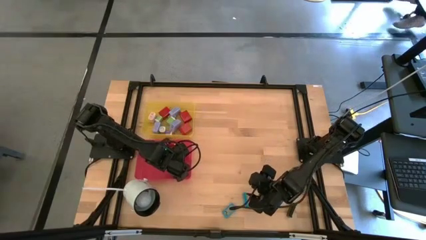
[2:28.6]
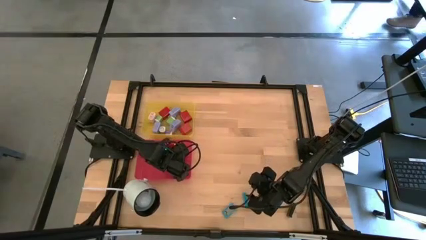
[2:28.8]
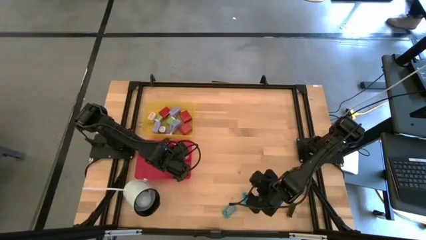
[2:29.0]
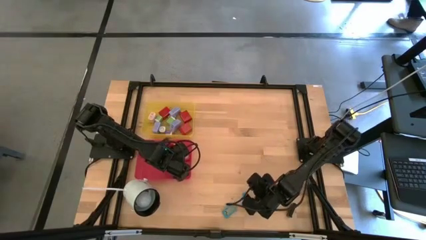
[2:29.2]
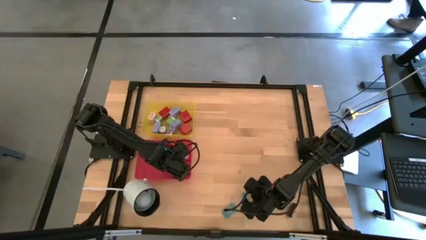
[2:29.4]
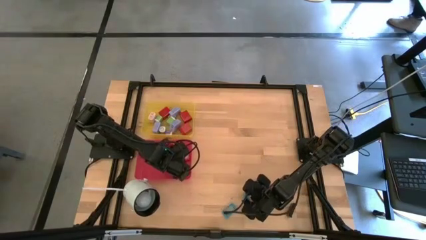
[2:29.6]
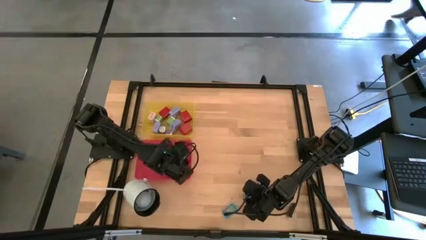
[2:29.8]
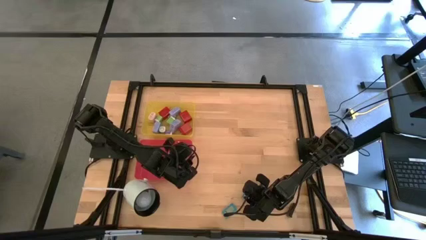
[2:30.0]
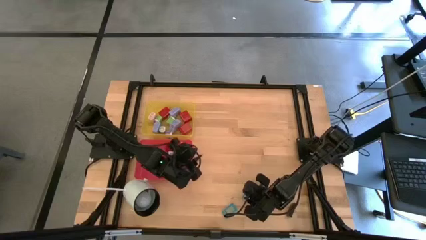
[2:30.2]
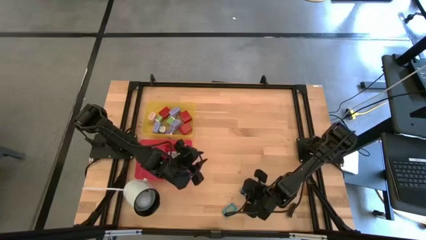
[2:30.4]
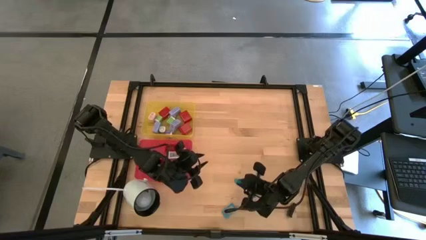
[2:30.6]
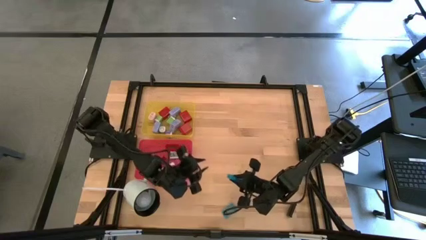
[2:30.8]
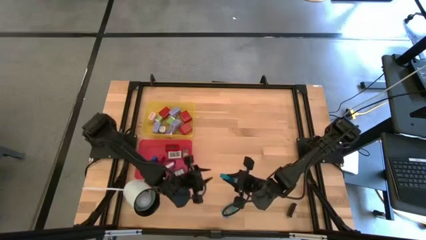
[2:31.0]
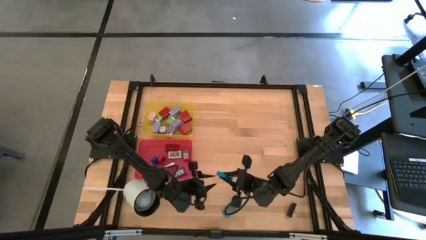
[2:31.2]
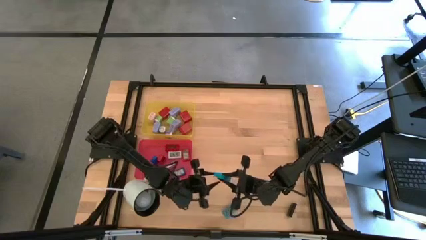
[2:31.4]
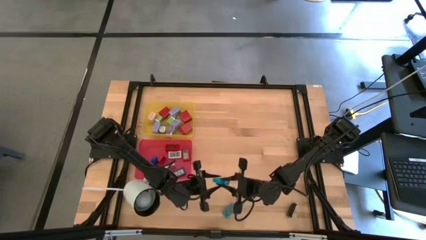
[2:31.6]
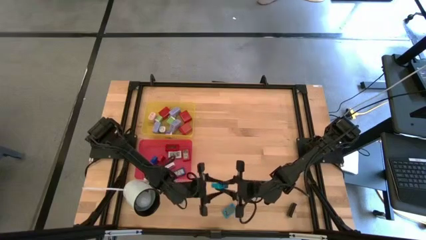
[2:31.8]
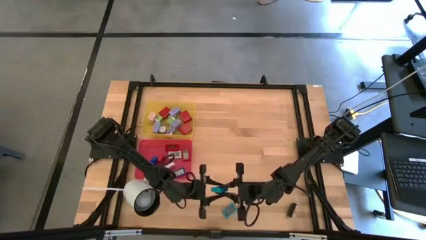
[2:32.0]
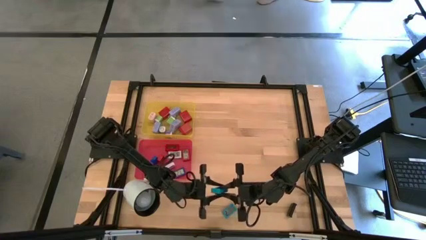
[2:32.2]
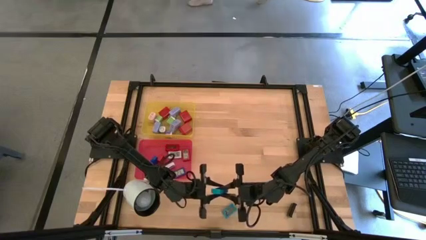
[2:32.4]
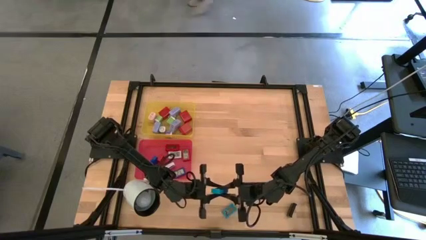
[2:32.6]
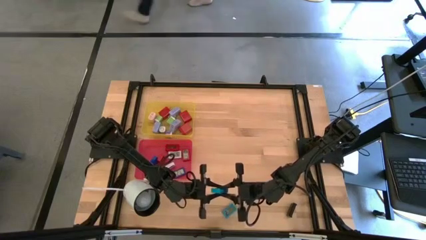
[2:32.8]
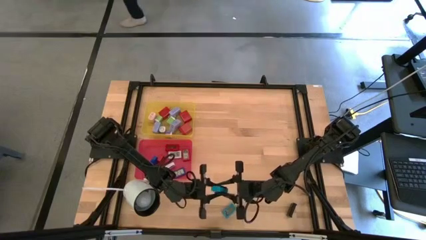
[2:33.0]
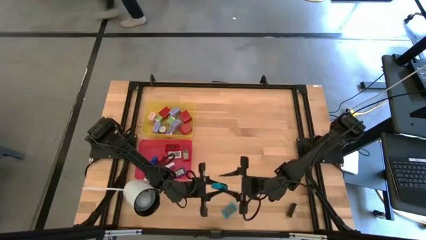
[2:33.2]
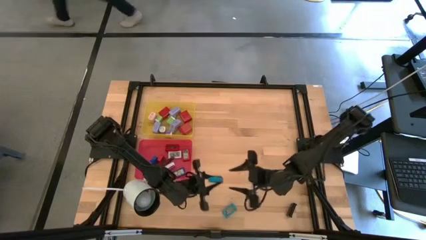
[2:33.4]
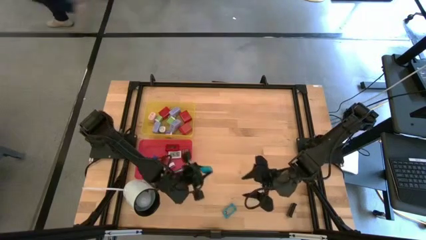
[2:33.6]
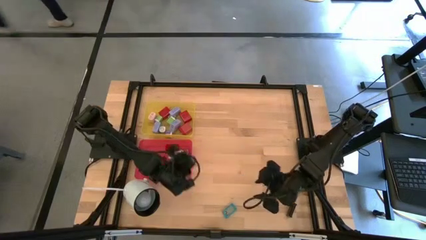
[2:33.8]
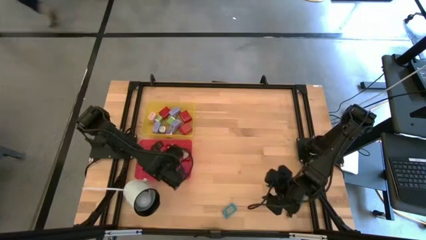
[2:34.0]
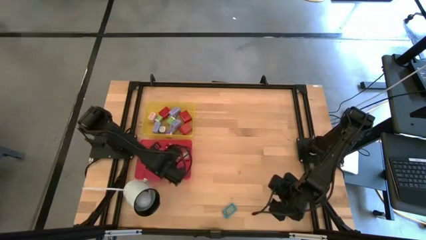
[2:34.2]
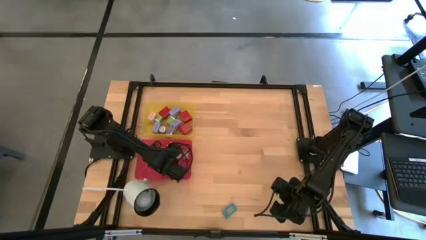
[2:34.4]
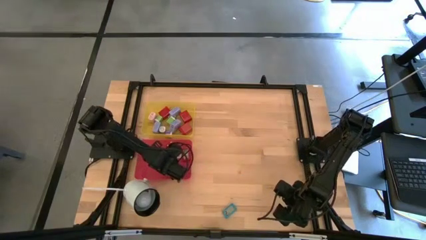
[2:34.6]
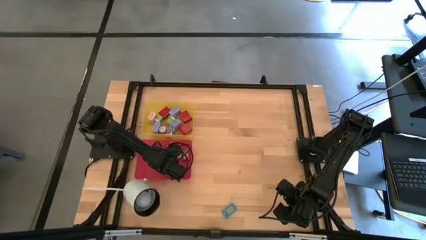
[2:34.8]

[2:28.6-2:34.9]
Task: Pick & Place Office items
Put the light blue timer into the red bin

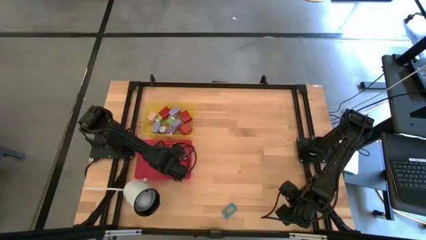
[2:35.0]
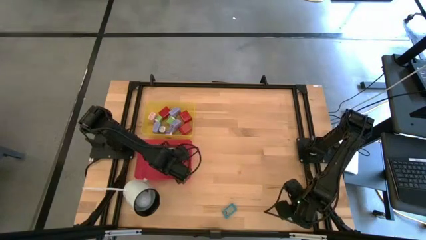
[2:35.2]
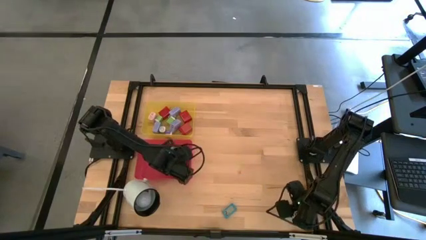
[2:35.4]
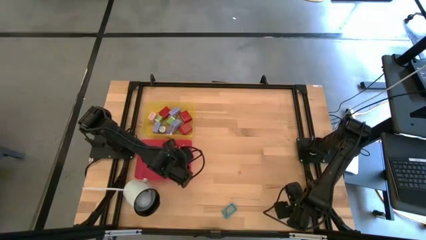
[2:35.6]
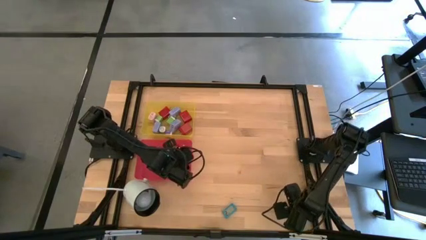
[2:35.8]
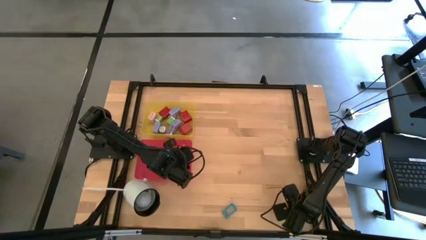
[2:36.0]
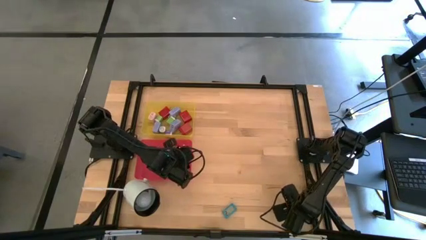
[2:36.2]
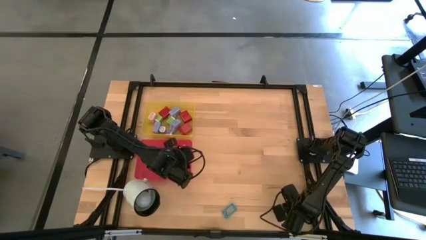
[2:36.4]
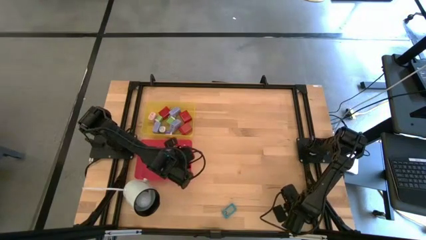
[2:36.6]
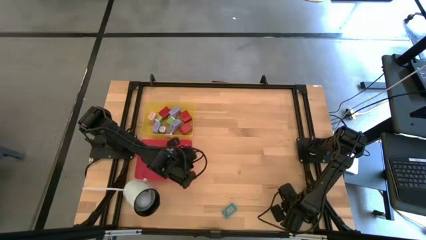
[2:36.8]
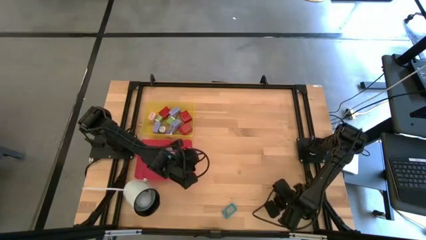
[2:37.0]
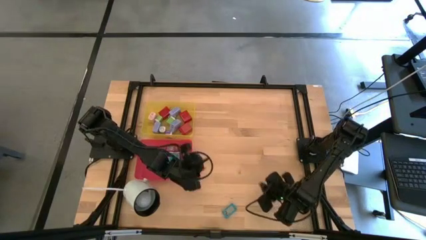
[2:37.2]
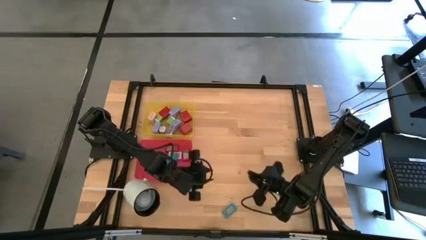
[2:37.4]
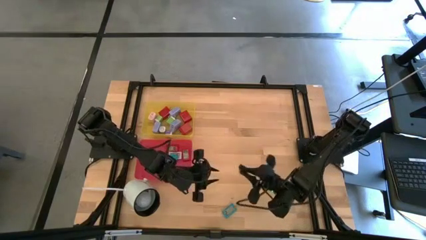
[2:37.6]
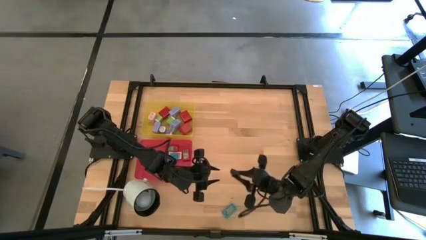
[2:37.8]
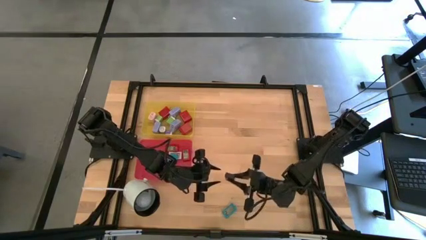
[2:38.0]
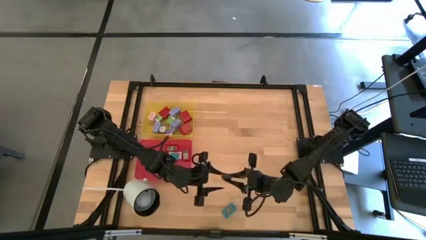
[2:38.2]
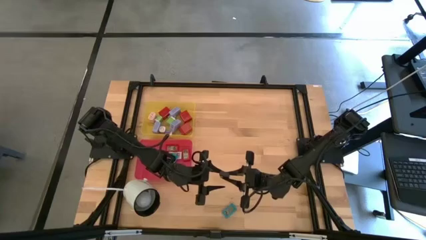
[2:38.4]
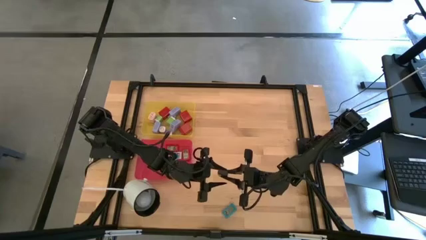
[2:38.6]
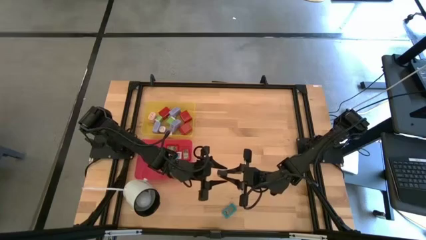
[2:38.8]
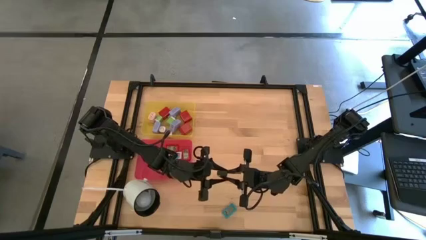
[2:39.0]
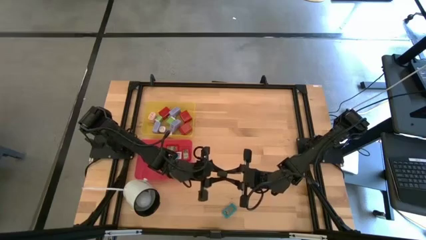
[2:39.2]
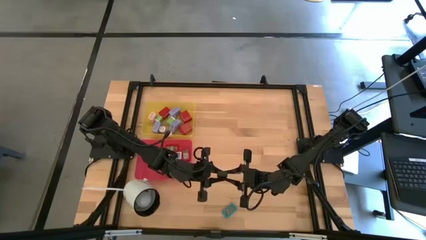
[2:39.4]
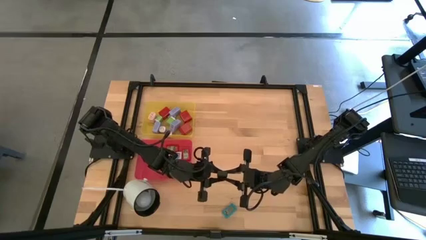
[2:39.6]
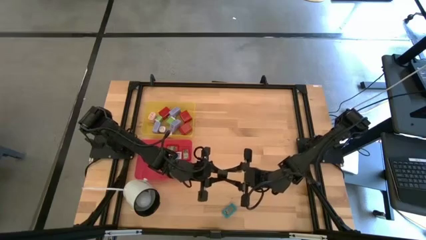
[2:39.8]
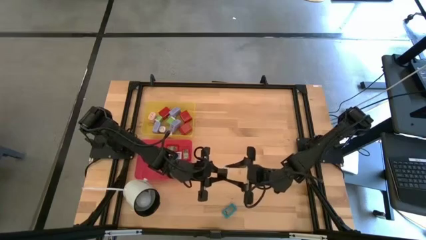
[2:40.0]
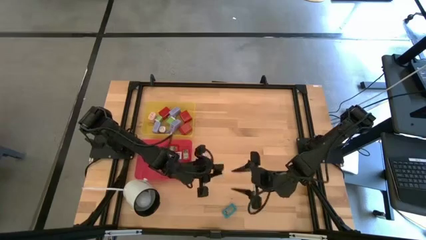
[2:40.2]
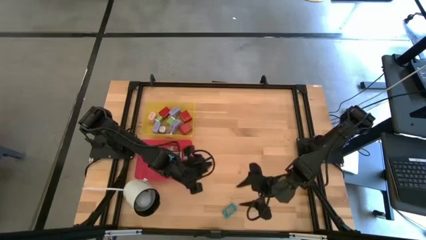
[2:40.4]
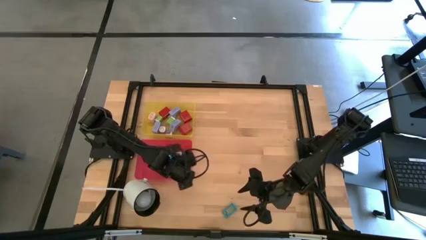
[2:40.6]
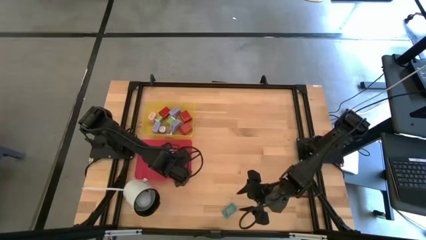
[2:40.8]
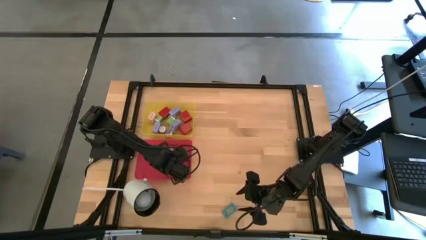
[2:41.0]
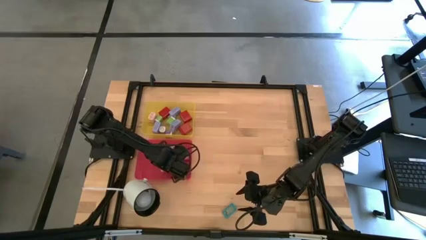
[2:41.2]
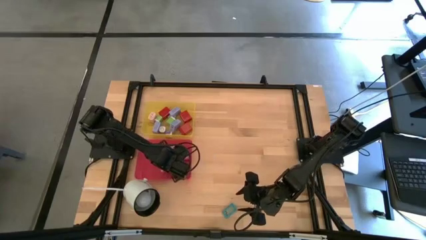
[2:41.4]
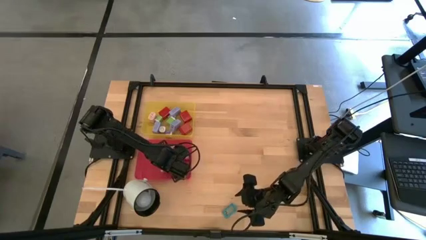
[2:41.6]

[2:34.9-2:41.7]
Put the black timer into the red bin
